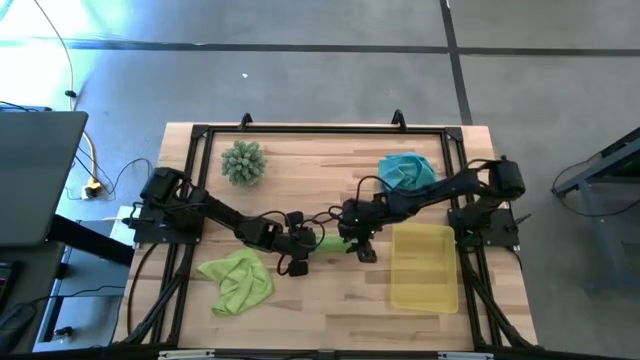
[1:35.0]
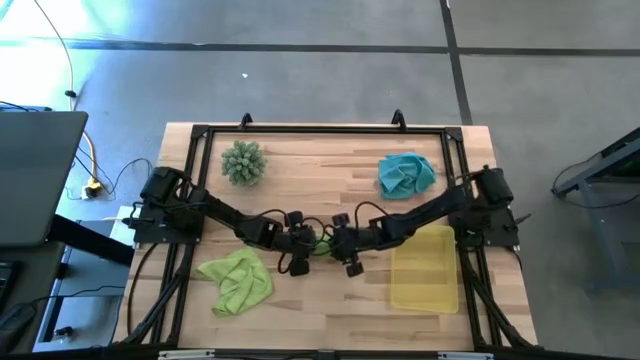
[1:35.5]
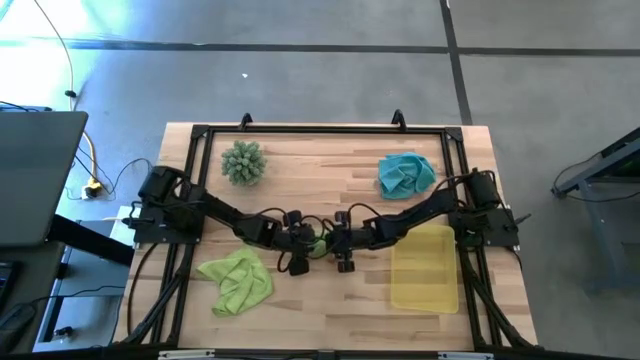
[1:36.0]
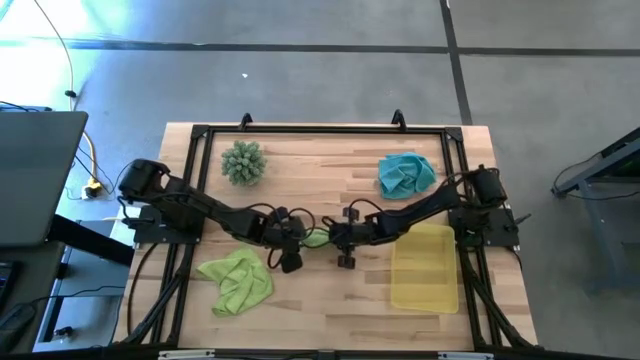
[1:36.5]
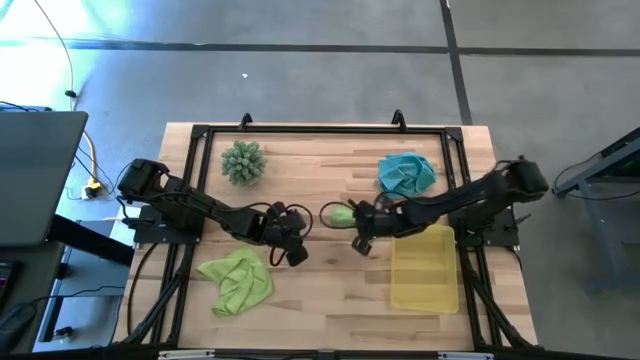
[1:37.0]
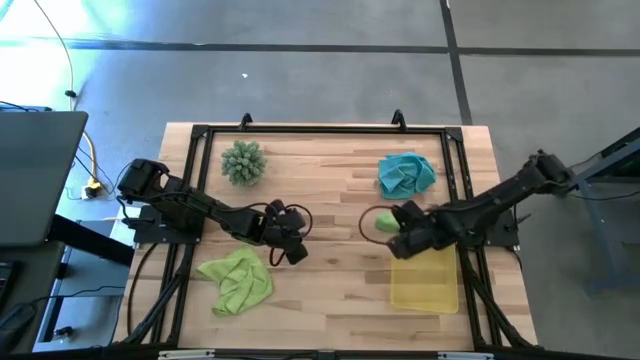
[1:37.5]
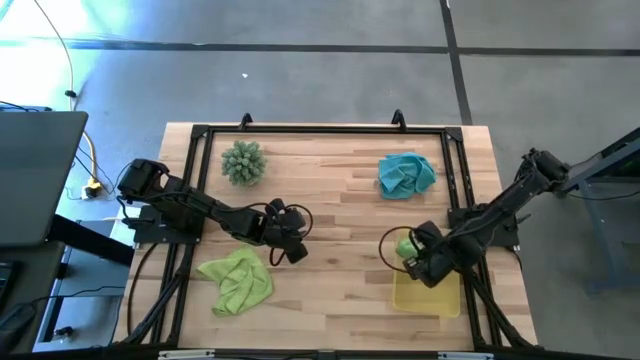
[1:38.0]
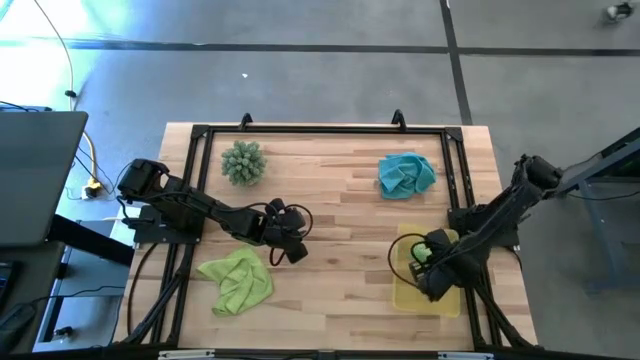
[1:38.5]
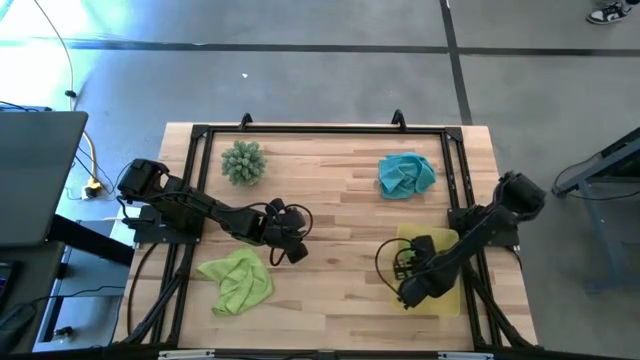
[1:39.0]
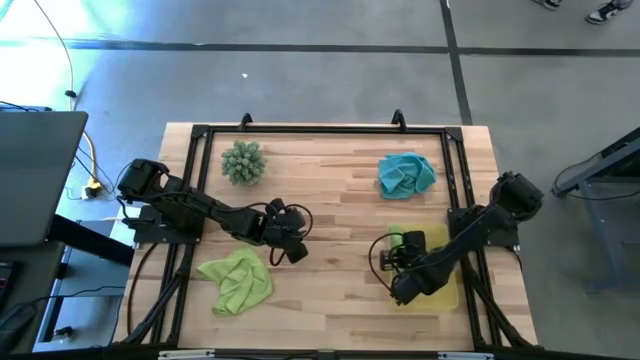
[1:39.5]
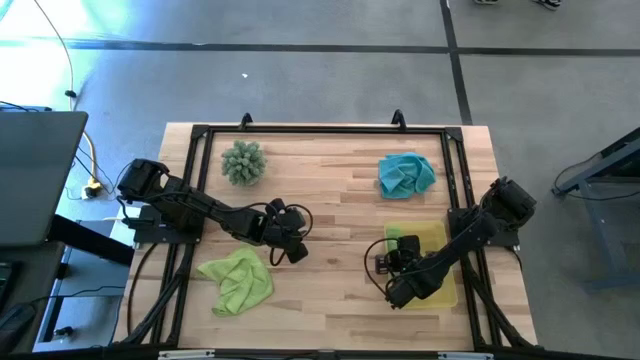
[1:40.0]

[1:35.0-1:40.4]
Task: Roll microfiber towels into tight, uniform cylinder then place into a basket
Put the green cloth into the bin

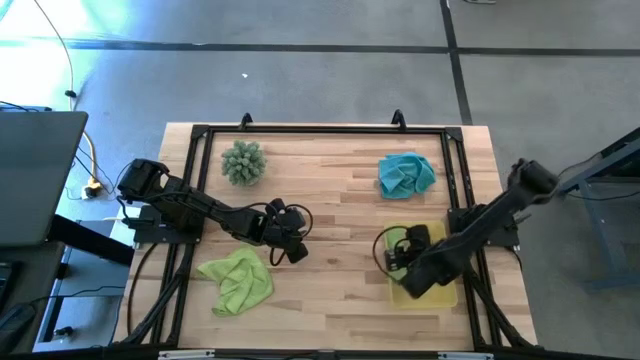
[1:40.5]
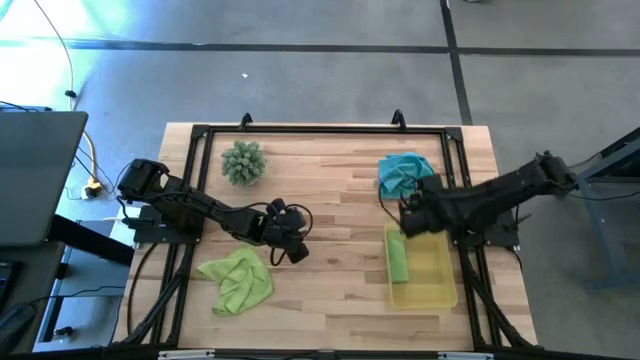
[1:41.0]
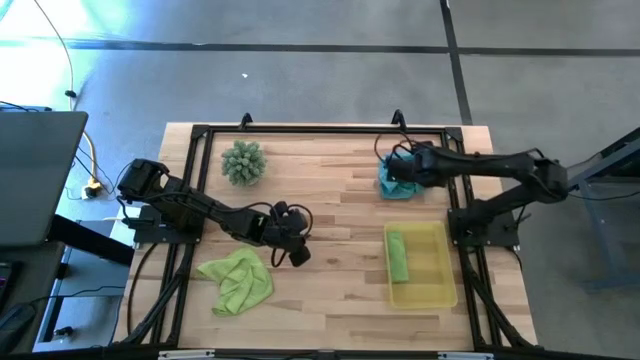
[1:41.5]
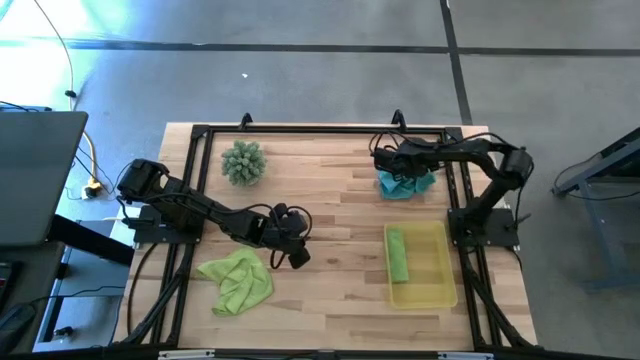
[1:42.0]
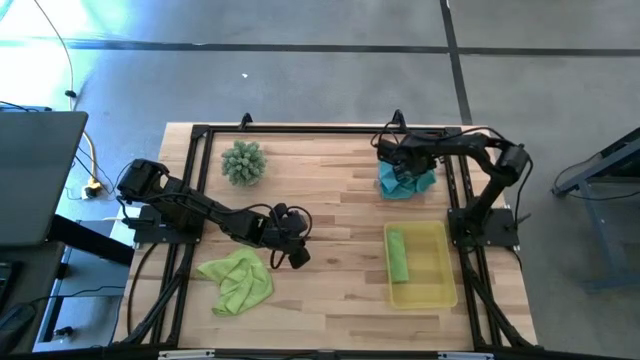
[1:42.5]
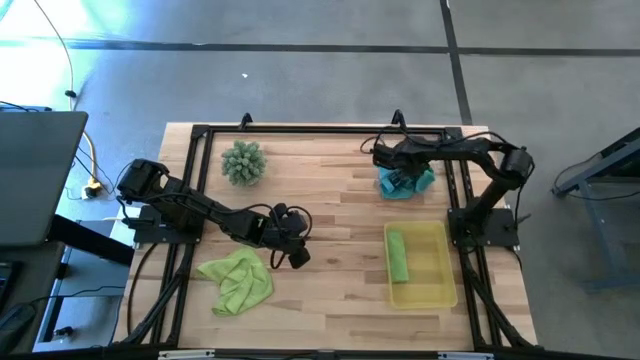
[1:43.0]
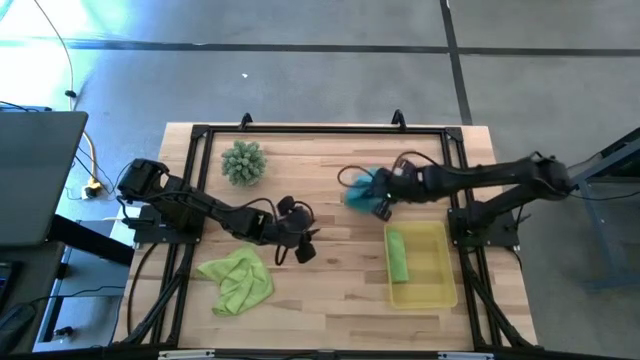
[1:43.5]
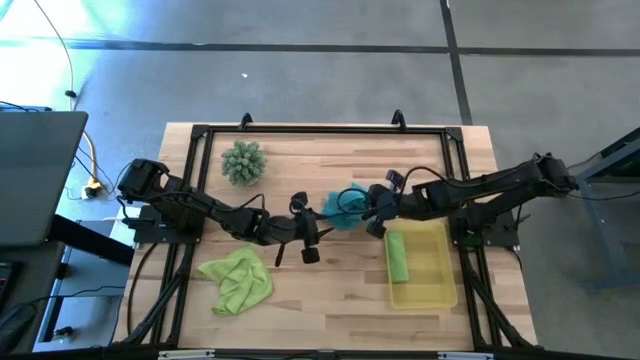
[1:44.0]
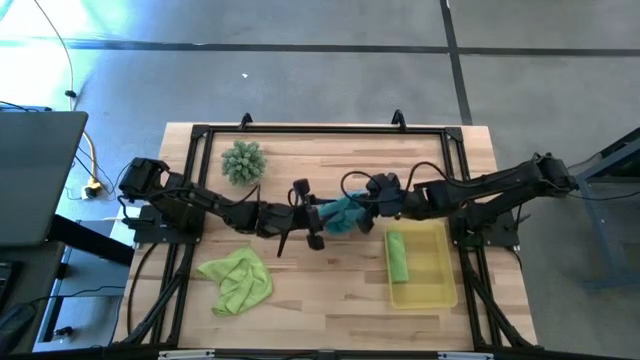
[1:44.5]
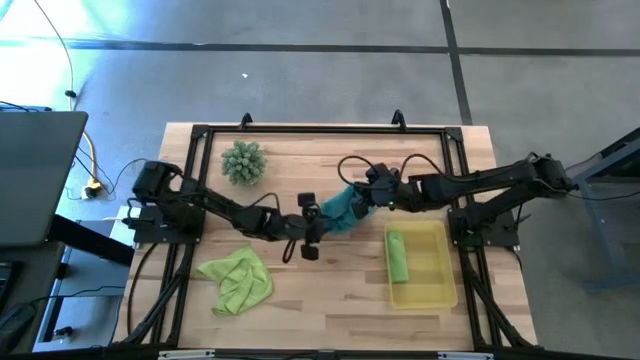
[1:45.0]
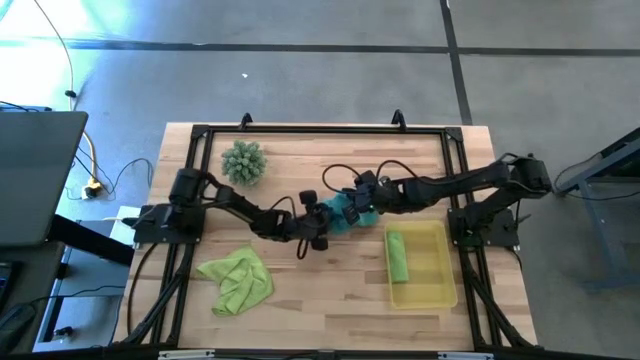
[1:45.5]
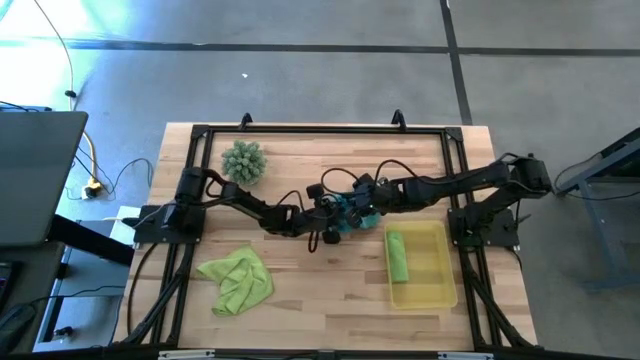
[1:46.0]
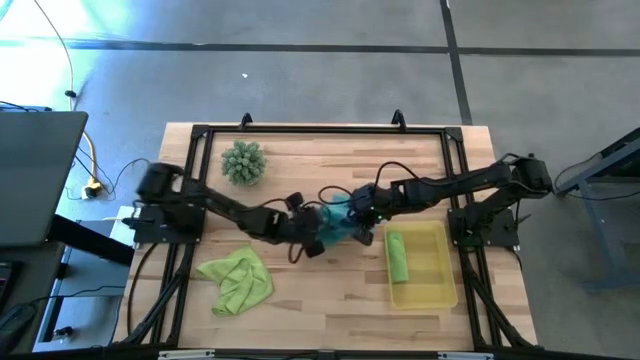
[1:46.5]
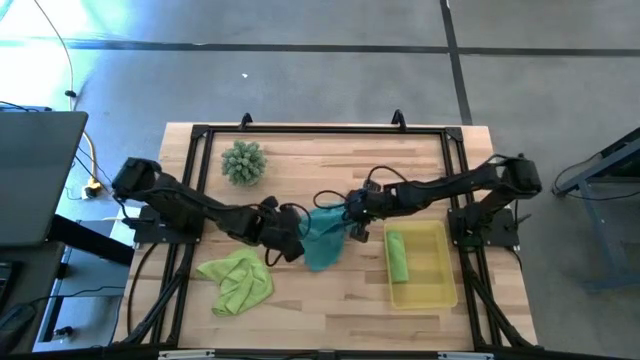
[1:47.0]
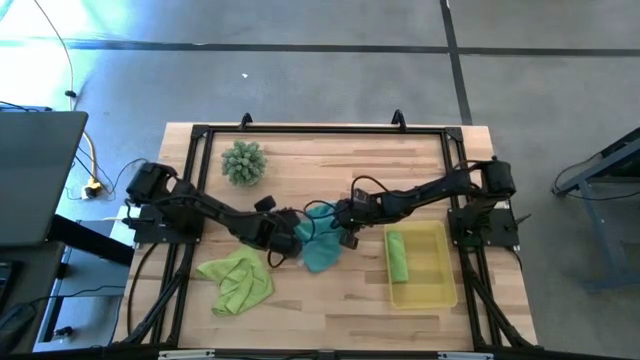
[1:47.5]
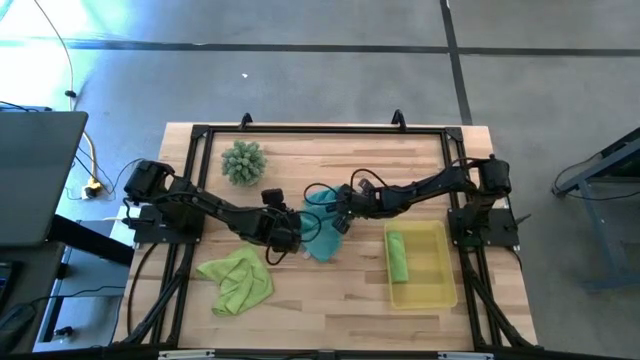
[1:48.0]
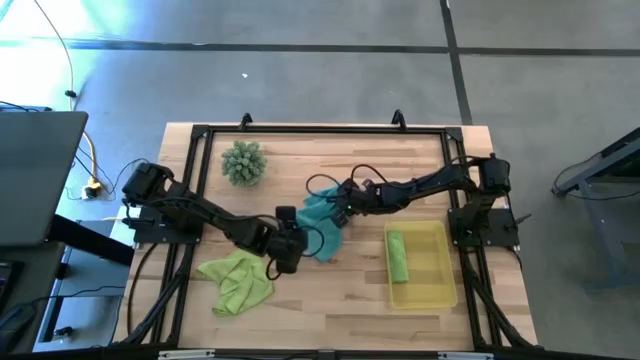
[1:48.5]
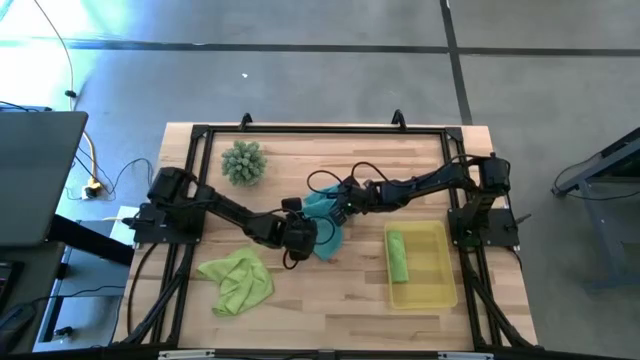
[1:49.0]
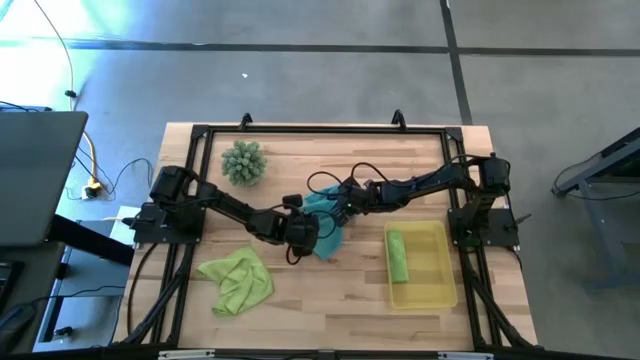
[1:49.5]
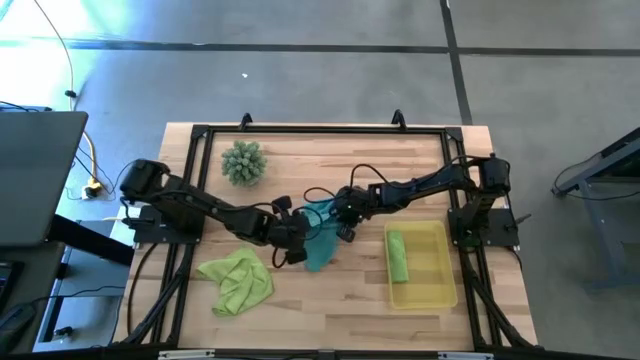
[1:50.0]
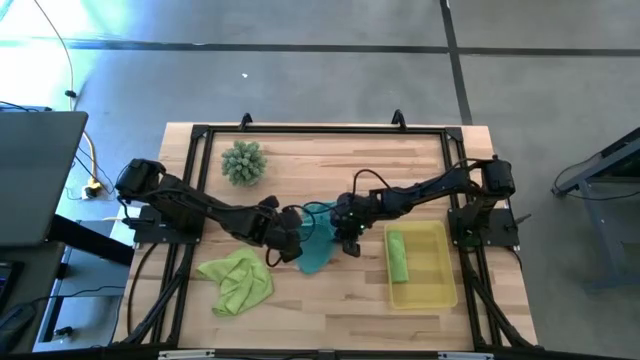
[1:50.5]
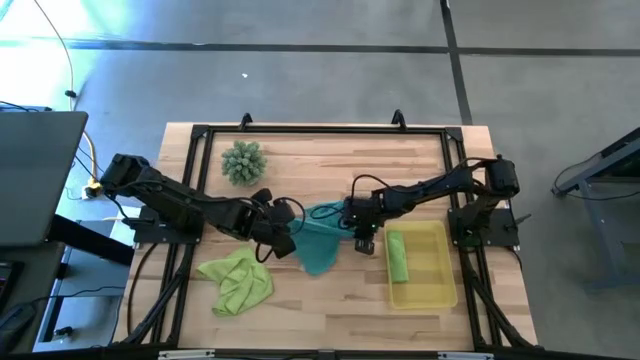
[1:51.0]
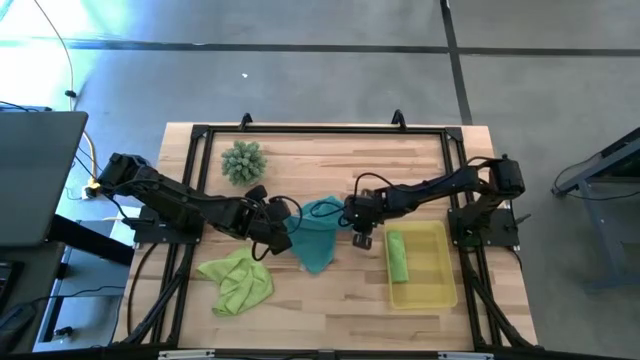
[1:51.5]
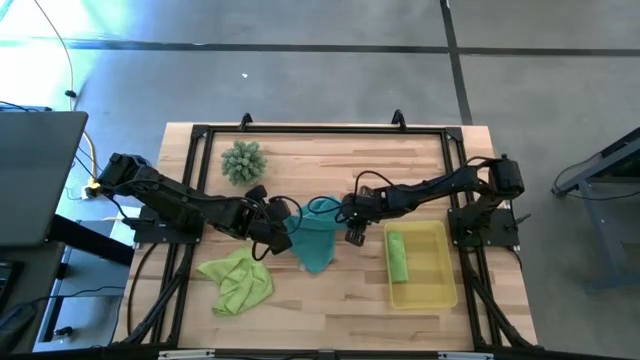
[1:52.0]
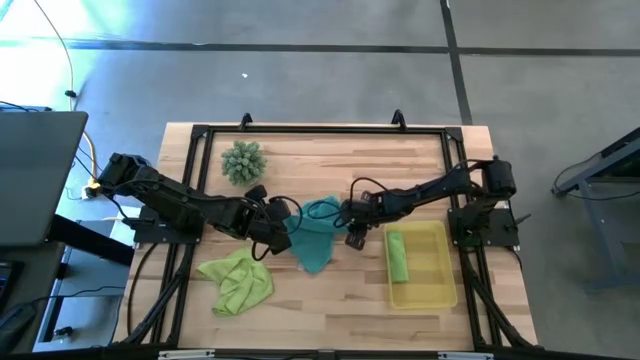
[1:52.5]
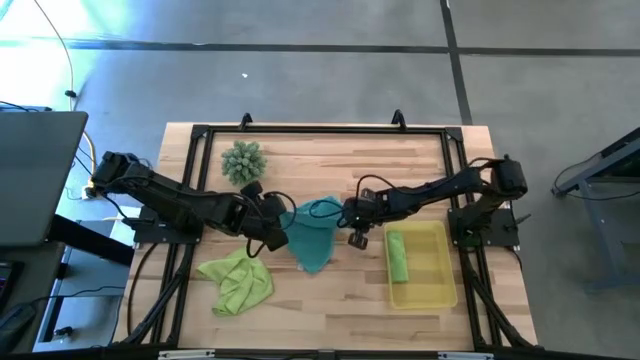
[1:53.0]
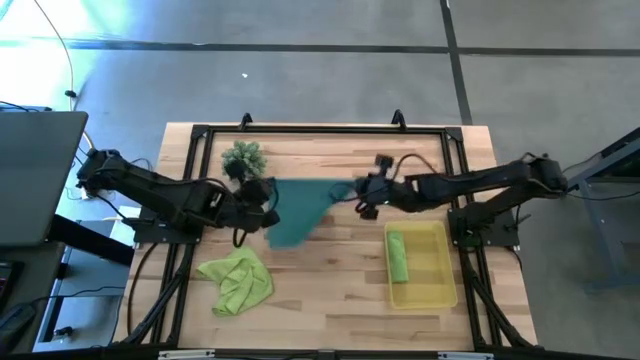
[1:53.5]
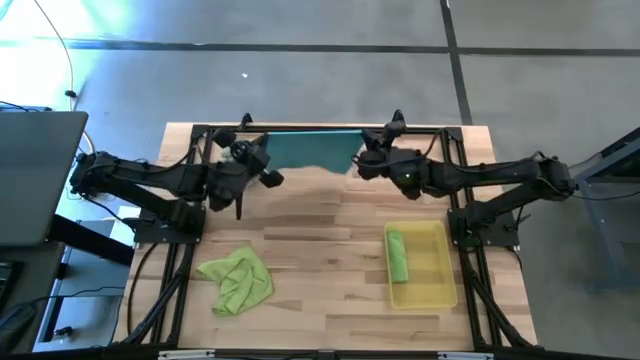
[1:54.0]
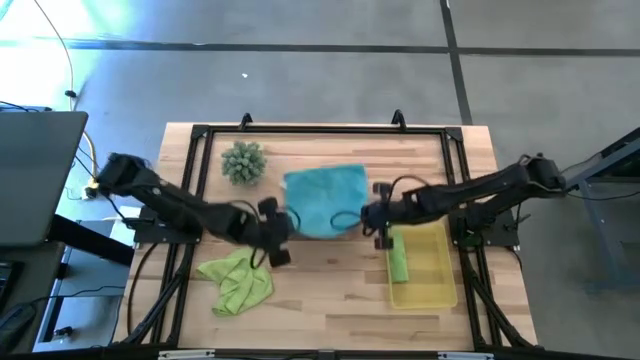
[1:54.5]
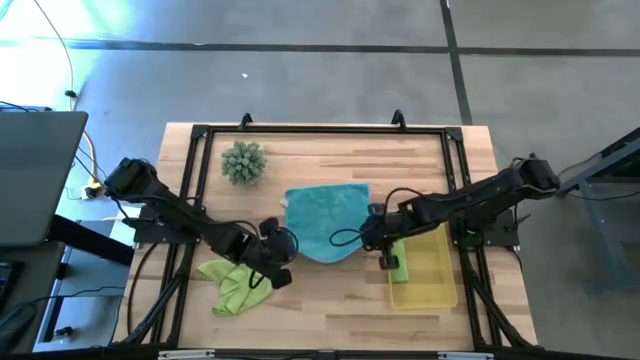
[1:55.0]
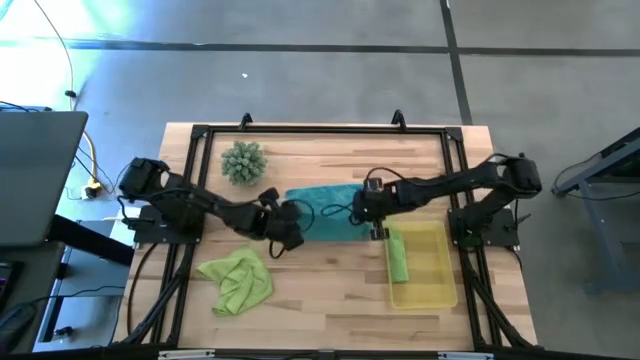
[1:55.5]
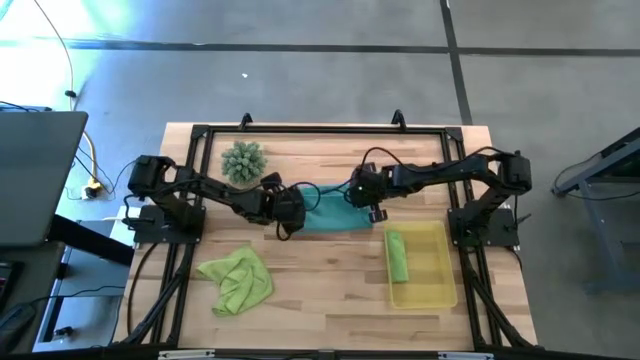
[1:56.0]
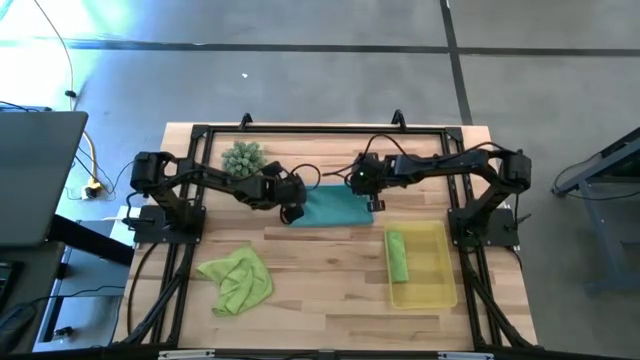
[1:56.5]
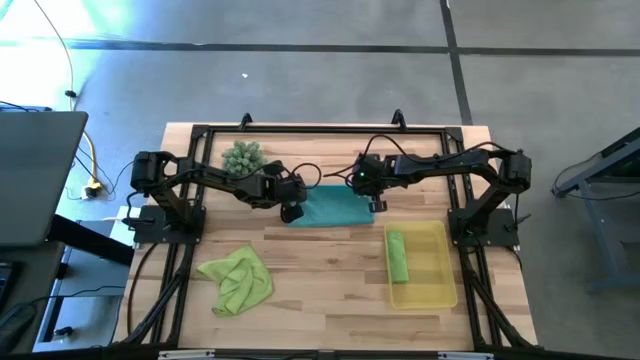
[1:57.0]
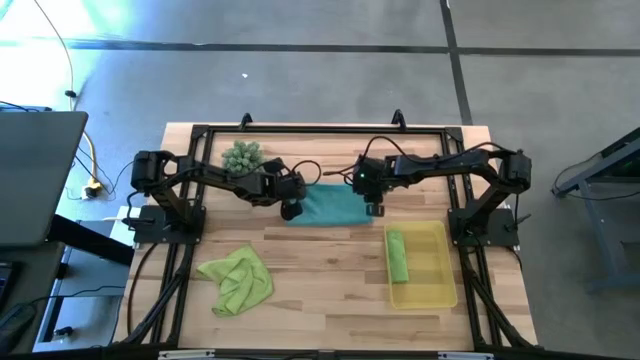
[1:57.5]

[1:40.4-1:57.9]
Fold the blue cloth
